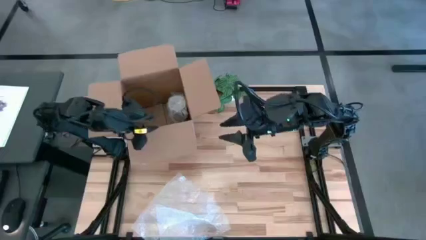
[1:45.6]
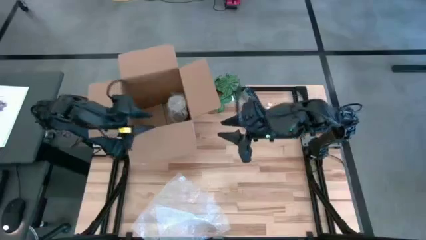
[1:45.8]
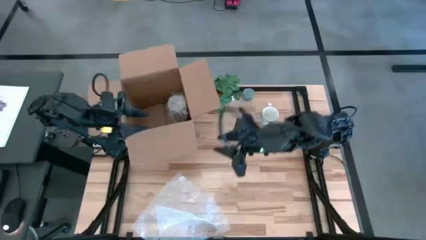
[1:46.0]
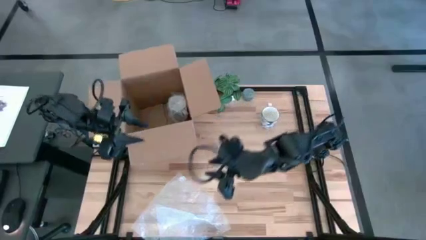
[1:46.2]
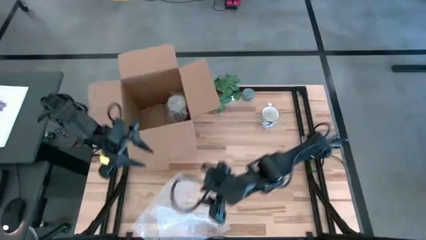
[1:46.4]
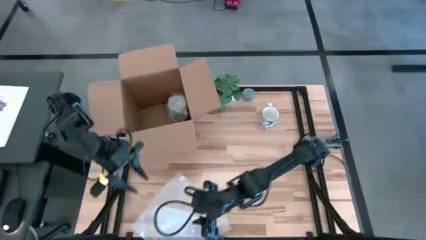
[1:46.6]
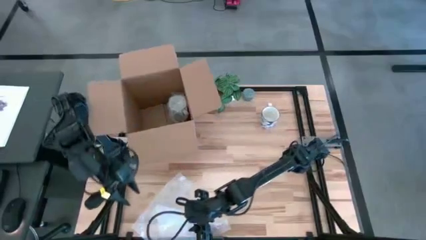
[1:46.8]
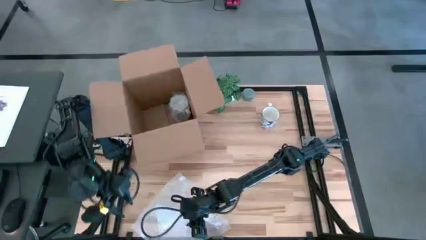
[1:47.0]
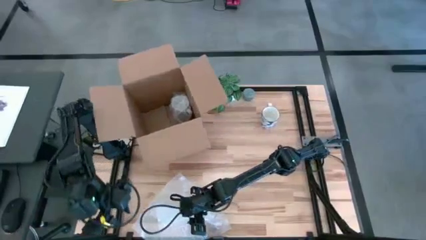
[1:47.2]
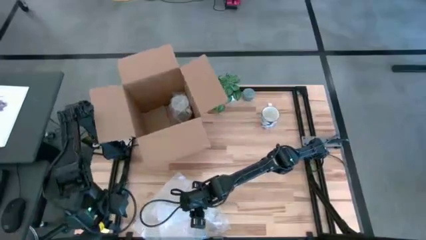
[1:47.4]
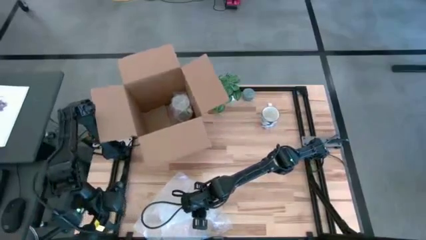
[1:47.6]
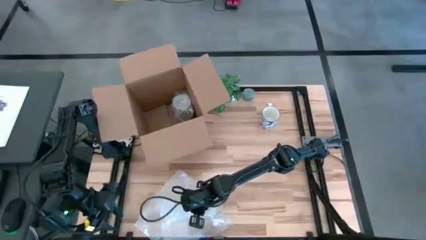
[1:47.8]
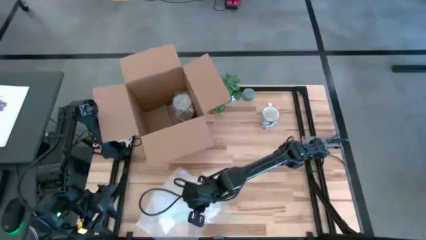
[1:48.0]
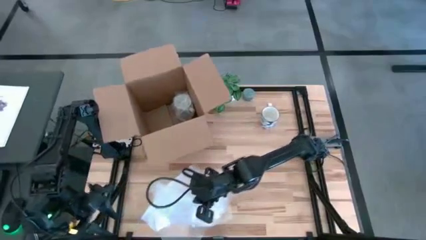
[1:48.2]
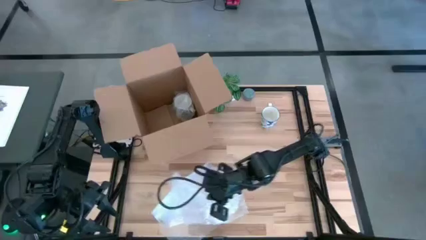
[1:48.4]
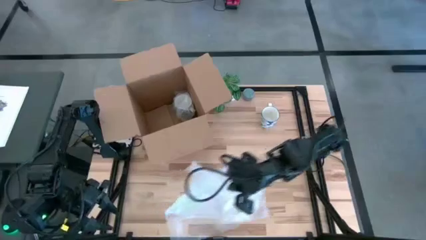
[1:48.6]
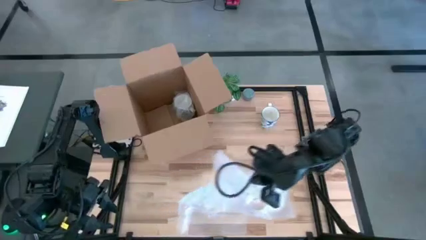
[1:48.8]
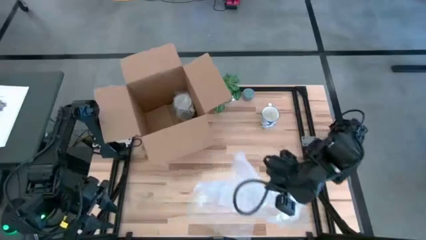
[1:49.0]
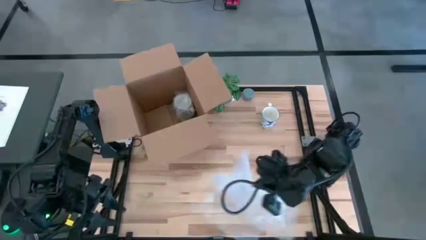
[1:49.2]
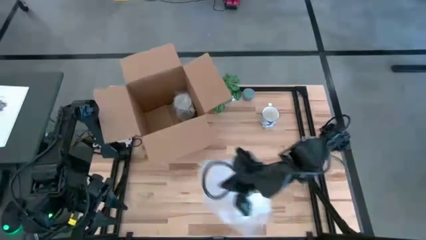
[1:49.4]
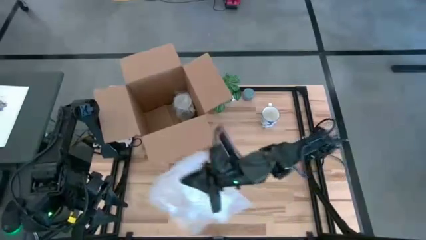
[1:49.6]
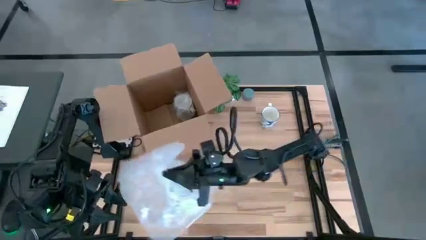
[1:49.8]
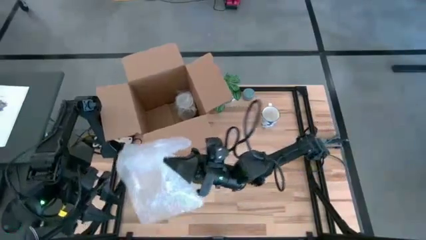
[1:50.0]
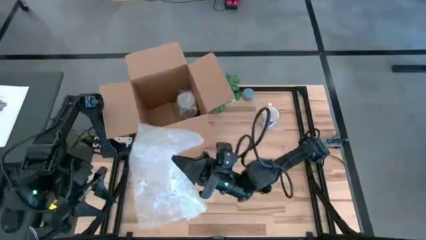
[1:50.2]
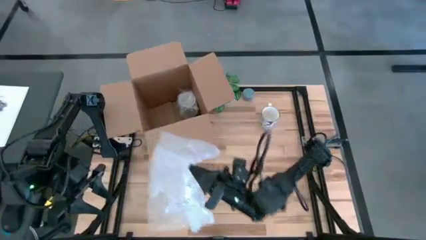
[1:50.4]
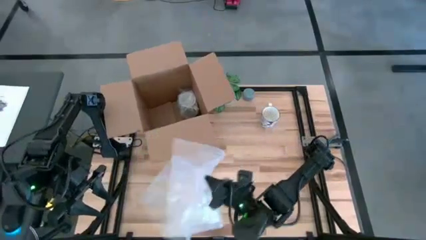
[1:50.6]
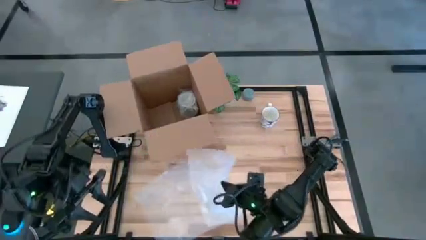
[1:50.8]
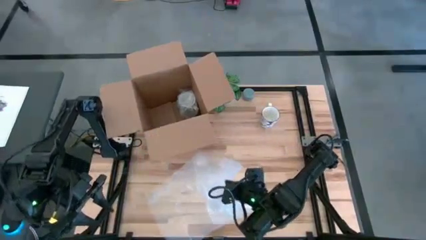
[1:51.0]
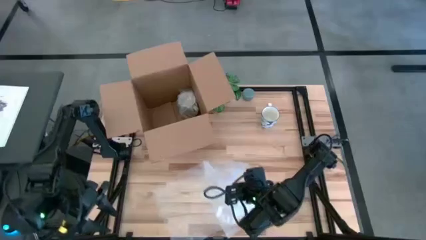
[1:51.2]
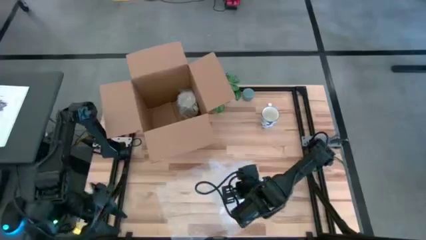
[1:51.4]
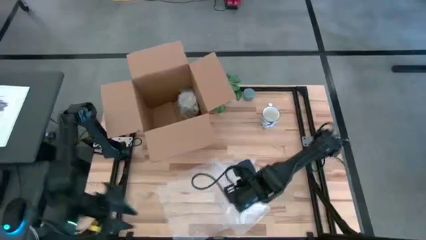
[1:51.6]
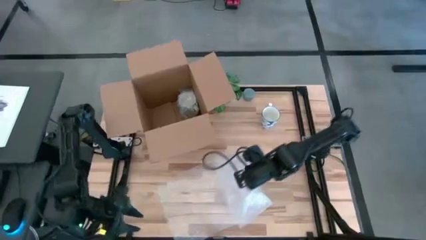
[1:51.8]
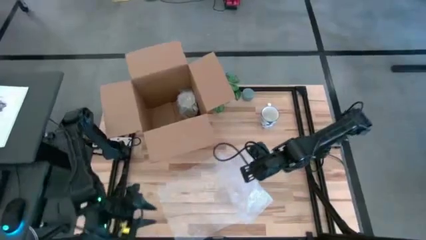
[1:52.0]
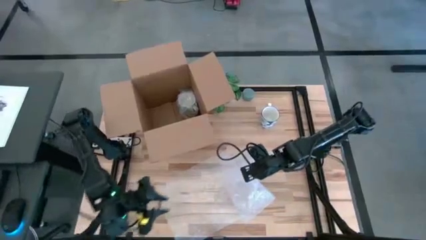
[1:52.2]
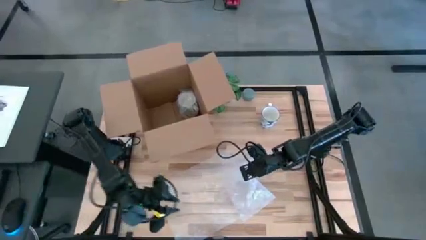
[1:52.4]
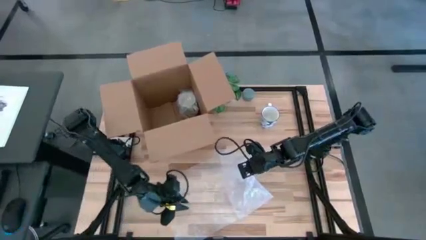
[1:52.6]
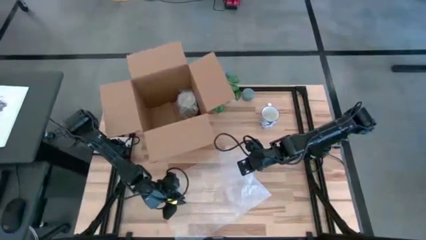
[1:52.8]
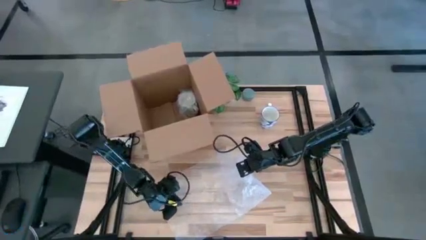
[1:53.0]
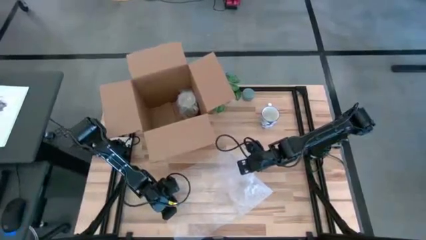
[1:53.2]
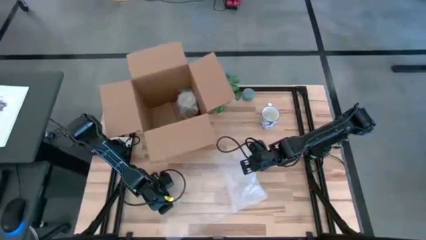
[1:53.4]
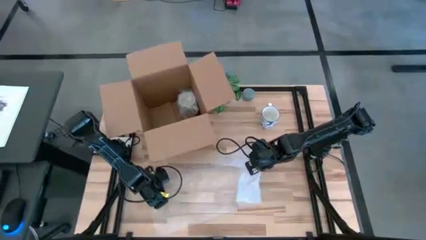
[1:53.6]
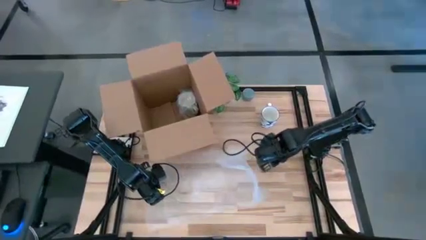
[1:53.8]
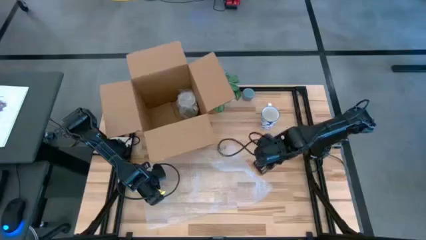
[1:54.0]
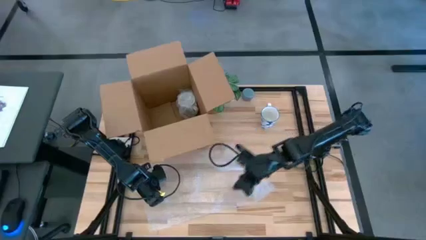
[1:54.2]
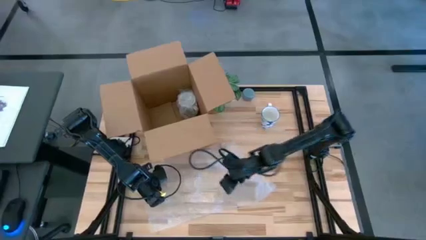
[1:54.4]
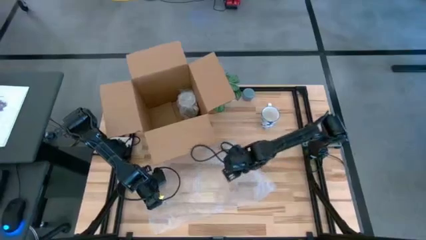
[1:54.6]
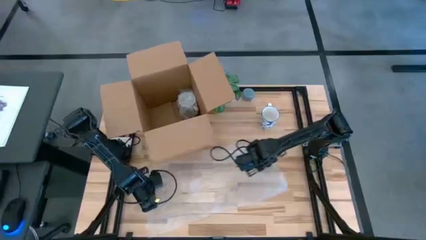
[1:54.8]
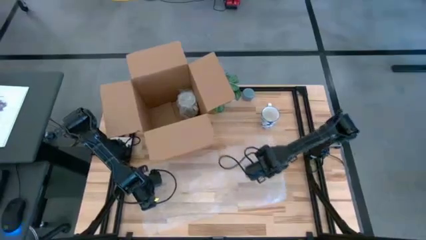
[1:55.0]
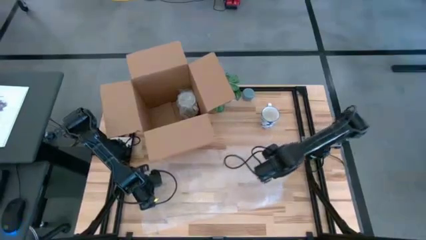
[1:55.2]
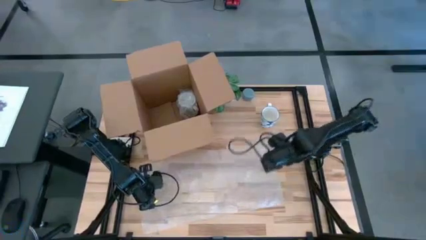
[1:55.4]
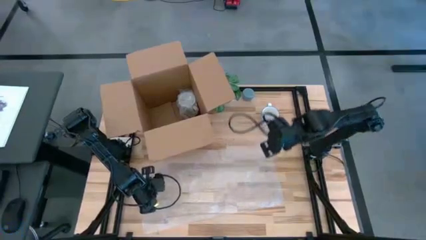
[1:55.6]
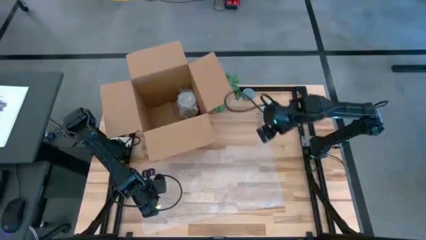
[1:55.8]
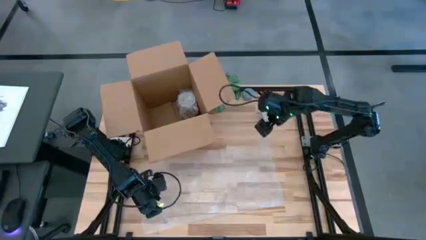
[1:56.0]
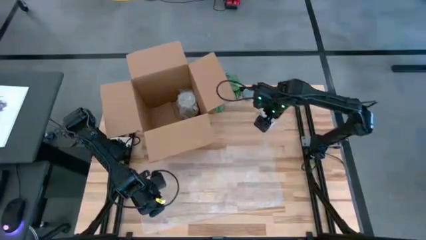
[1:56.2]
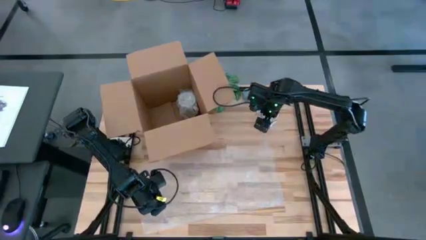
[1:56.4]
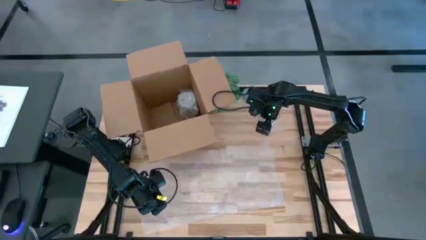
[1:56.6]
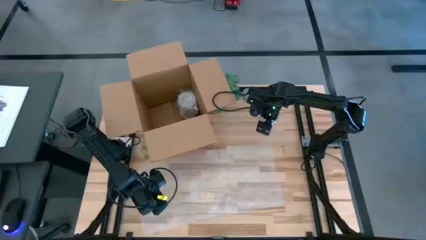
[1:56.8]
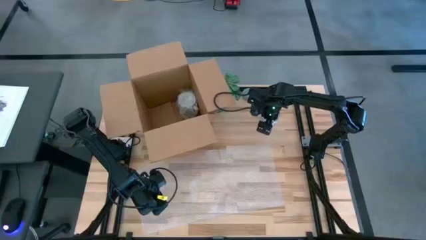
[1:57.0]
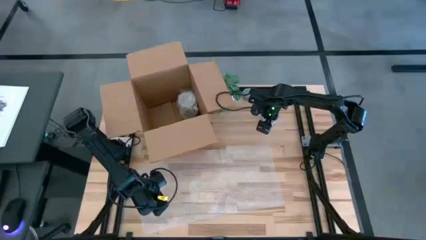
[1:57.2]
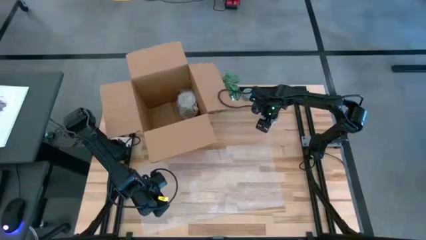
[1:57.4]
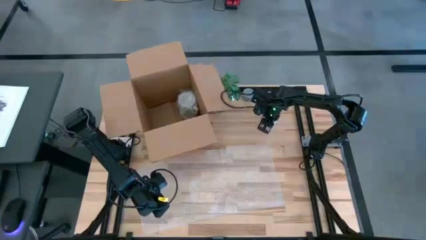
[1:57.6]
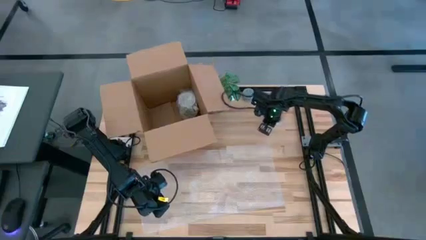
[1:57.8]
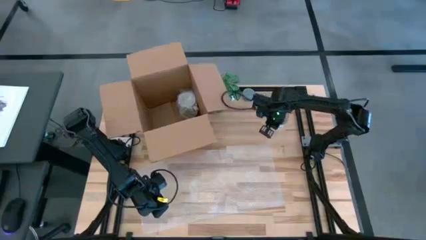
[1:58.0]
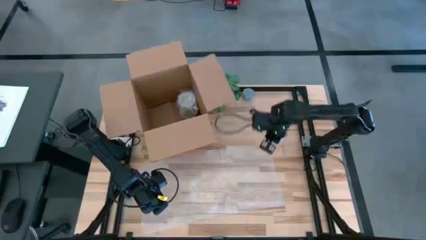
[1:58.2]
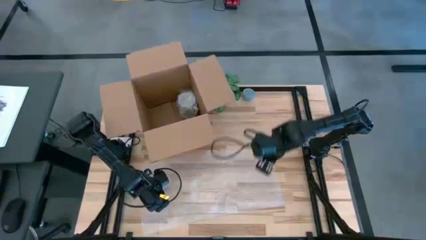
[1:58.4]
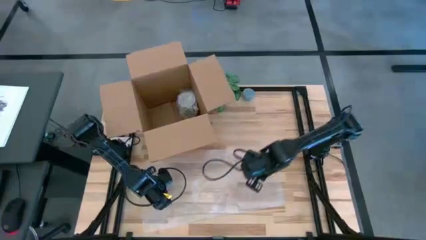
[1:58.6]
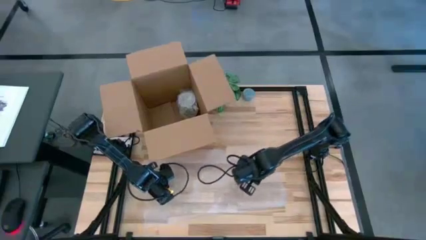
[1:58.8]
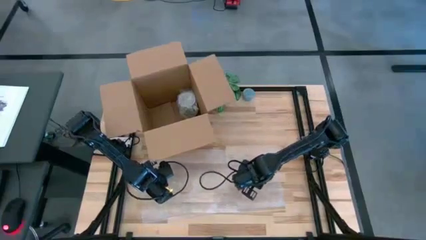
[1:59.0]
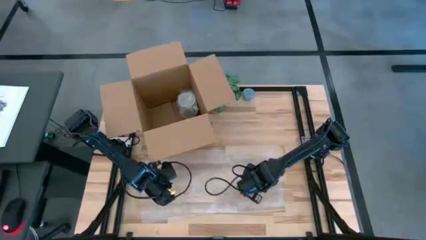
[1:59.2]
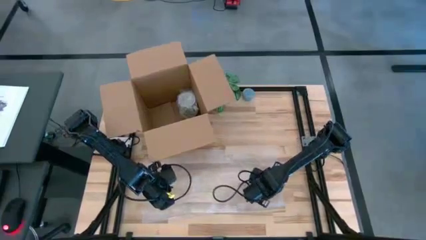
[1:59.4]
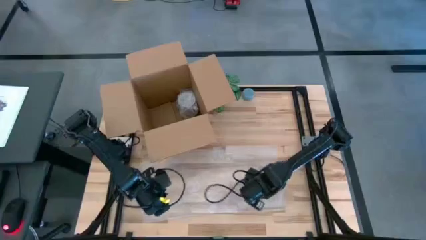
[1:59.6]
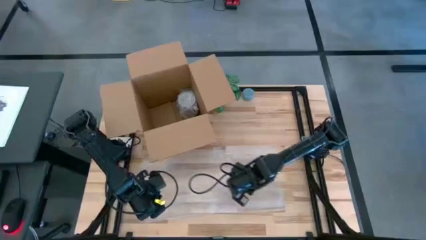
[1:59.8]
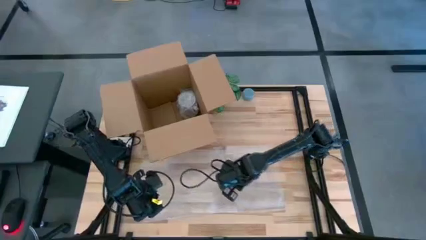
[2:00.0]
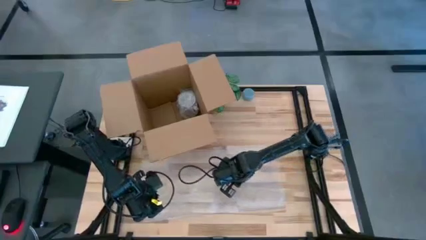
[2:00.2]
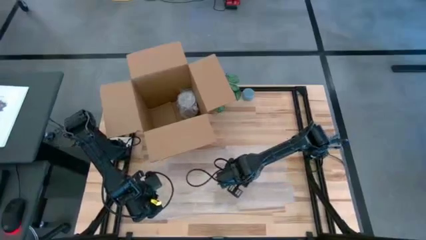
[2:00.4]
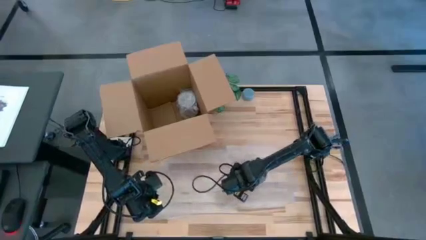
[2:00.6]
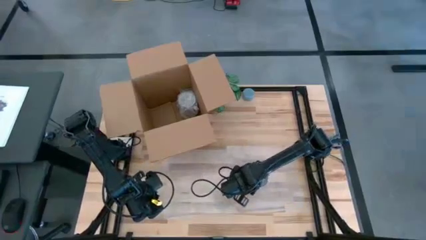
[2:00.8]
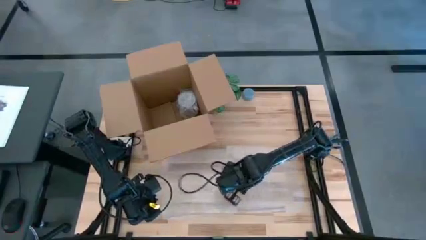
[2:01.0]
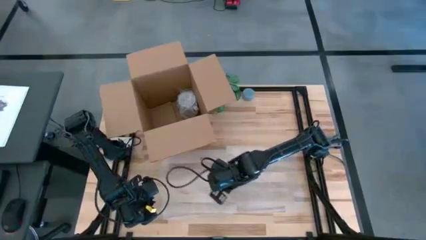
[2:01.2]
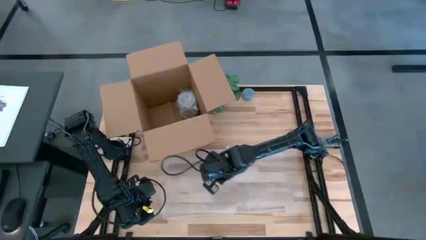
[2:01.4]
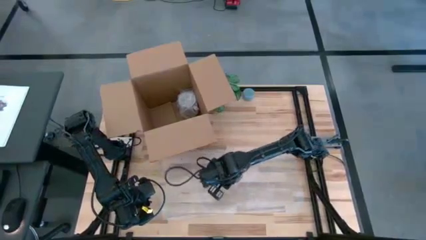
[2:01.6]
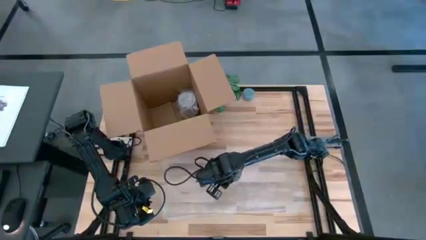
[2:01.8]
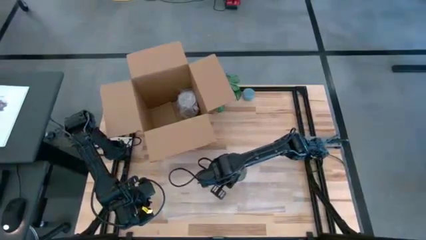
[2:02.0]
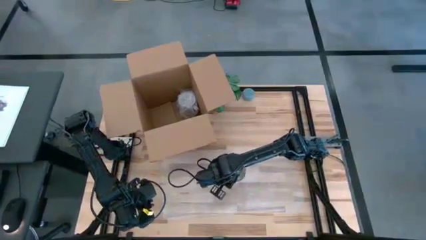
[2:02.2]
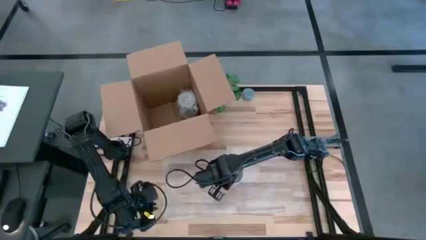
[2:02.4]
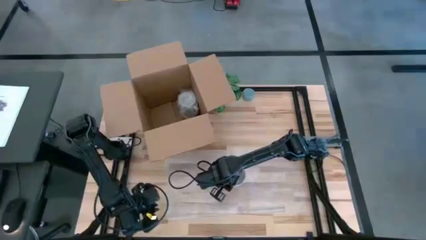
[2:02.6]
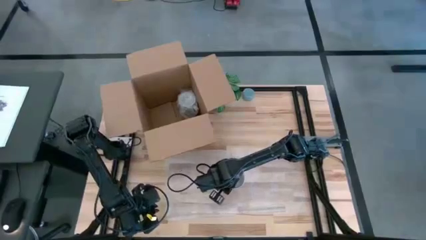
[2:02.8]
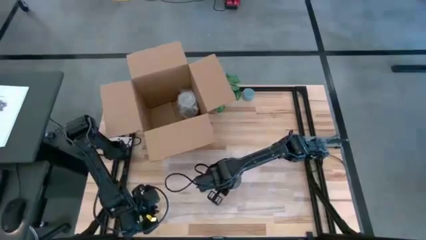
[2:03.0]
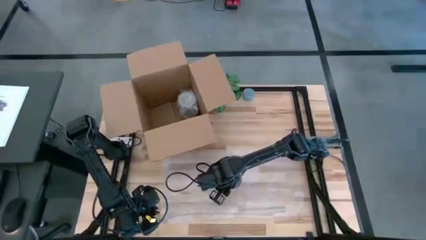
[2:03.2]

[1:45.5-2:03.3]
Task: wrap mug
Wrap the blue mug with the bubble wrap
